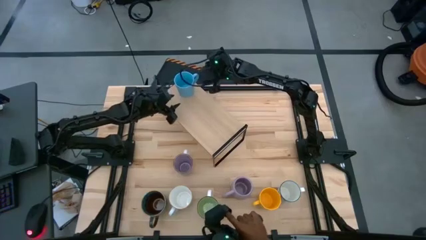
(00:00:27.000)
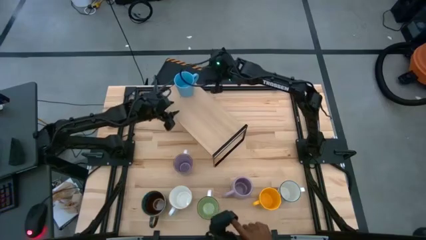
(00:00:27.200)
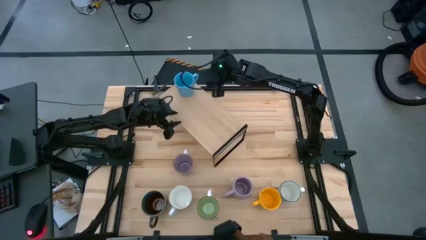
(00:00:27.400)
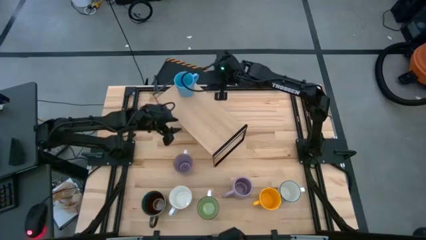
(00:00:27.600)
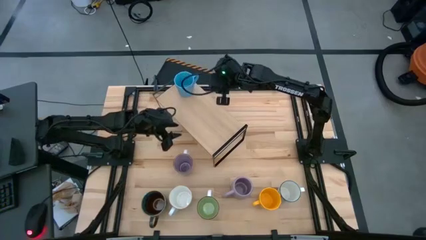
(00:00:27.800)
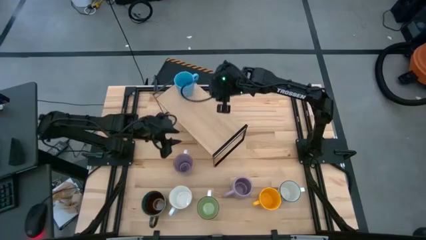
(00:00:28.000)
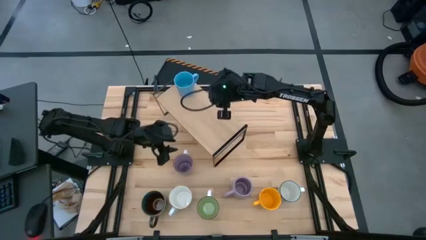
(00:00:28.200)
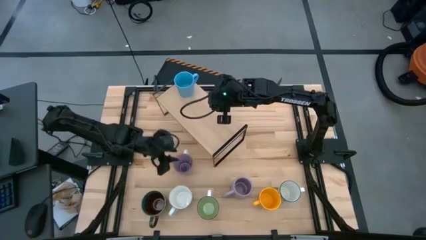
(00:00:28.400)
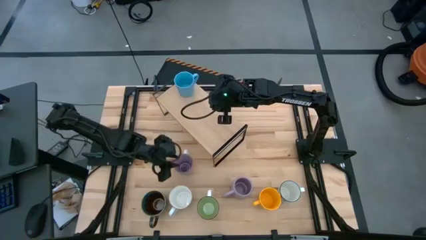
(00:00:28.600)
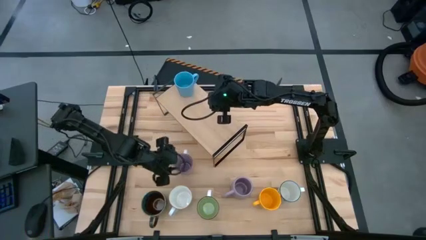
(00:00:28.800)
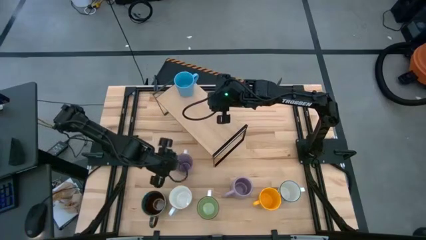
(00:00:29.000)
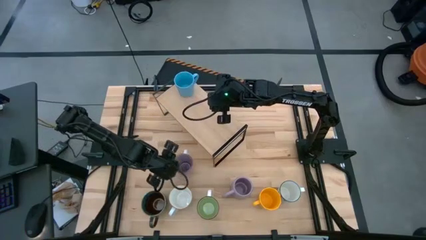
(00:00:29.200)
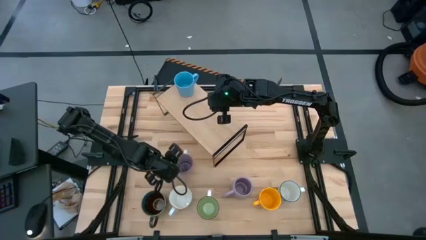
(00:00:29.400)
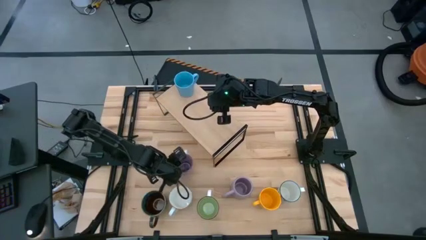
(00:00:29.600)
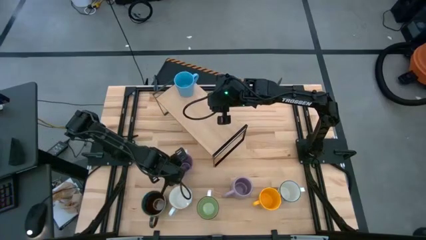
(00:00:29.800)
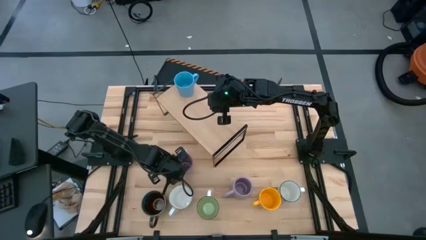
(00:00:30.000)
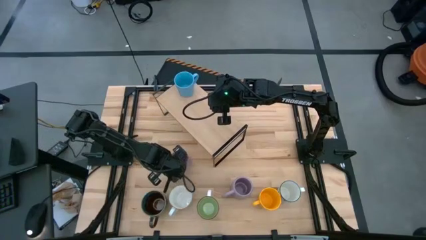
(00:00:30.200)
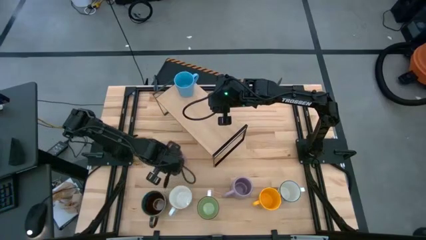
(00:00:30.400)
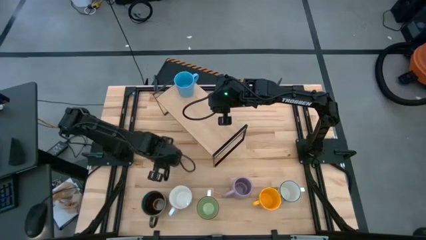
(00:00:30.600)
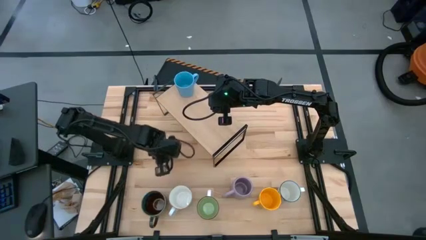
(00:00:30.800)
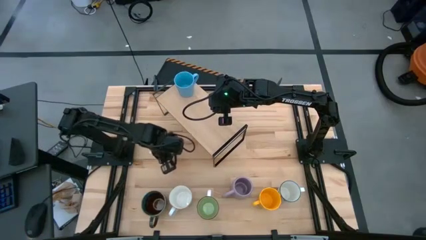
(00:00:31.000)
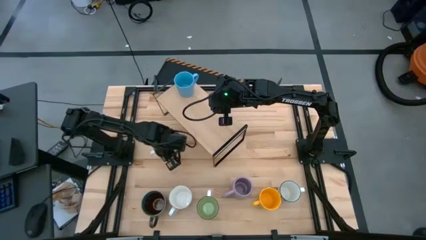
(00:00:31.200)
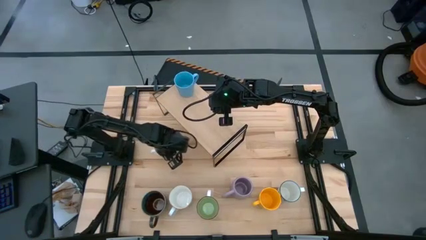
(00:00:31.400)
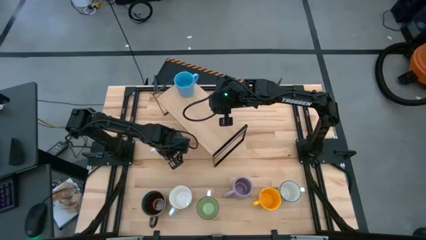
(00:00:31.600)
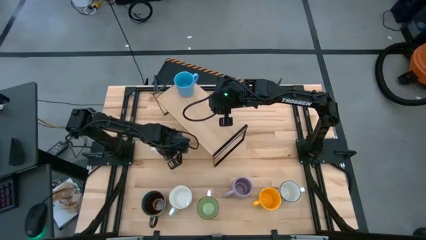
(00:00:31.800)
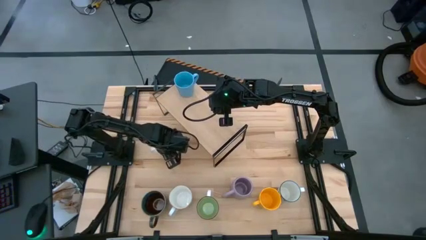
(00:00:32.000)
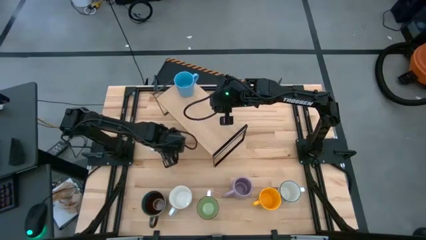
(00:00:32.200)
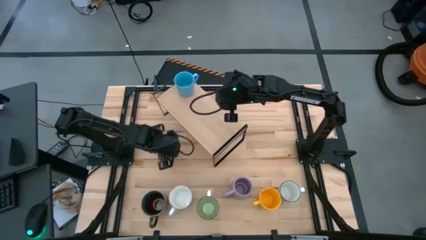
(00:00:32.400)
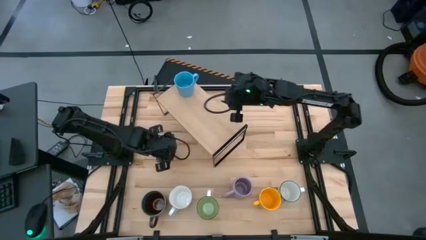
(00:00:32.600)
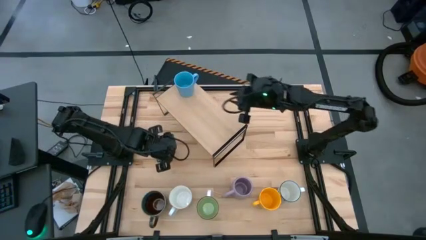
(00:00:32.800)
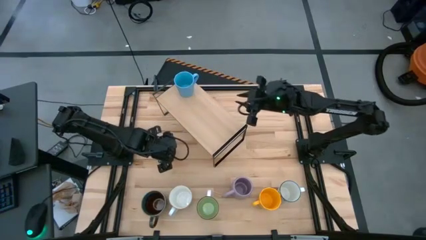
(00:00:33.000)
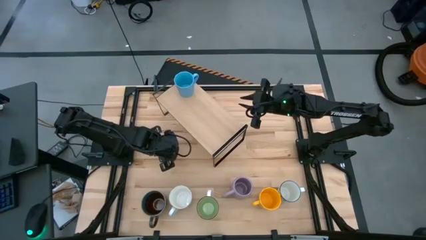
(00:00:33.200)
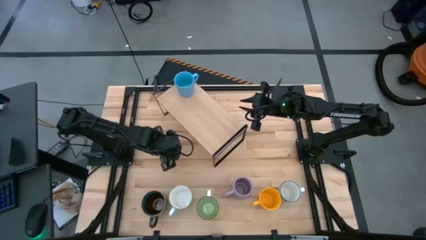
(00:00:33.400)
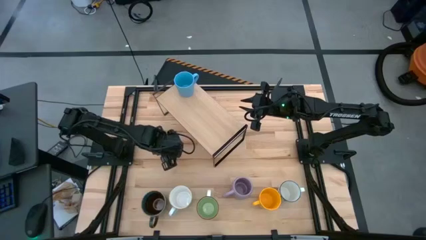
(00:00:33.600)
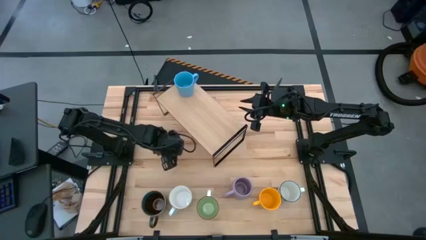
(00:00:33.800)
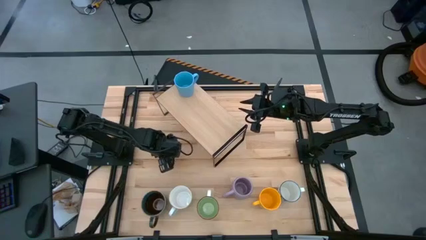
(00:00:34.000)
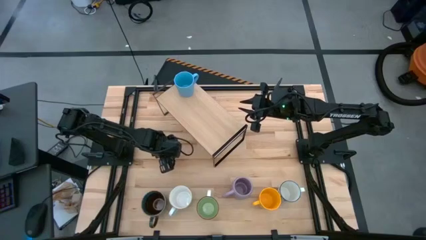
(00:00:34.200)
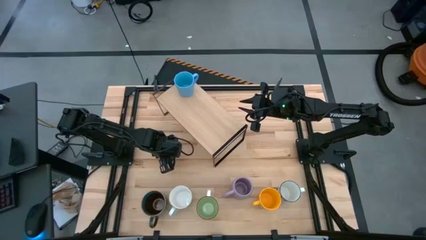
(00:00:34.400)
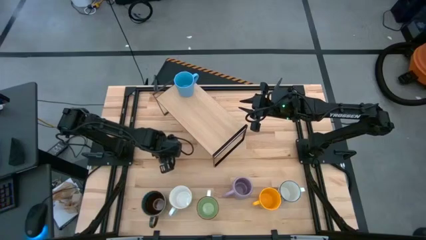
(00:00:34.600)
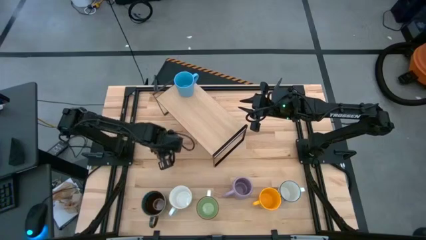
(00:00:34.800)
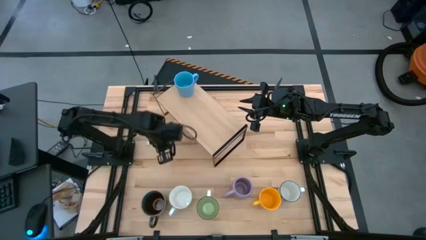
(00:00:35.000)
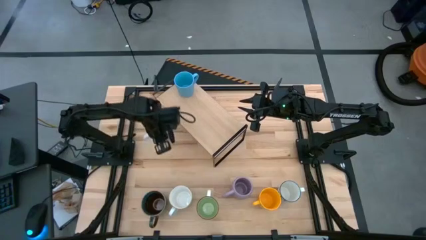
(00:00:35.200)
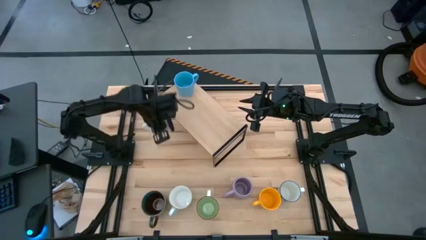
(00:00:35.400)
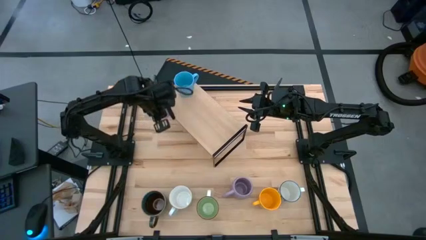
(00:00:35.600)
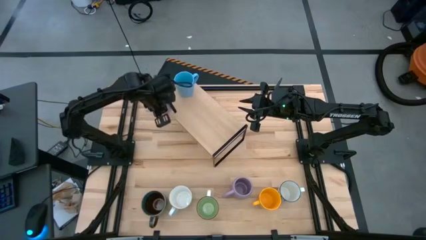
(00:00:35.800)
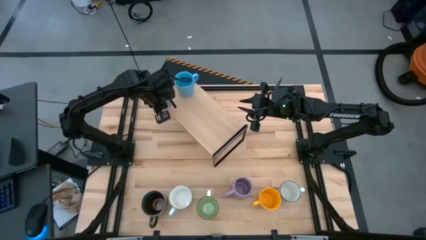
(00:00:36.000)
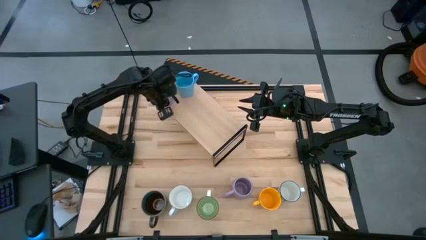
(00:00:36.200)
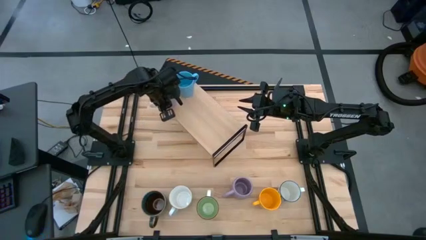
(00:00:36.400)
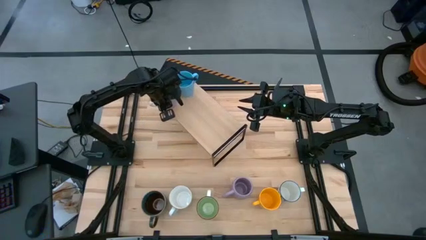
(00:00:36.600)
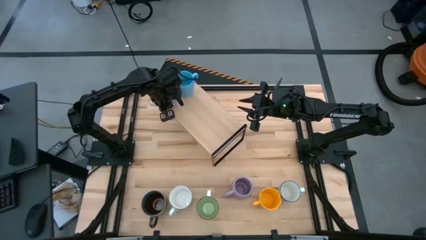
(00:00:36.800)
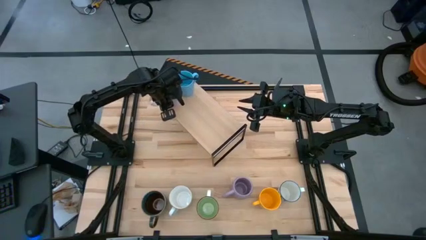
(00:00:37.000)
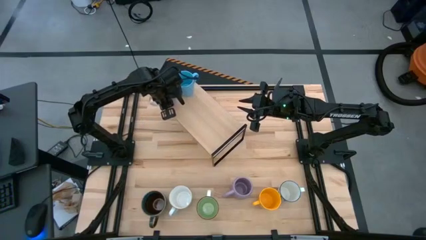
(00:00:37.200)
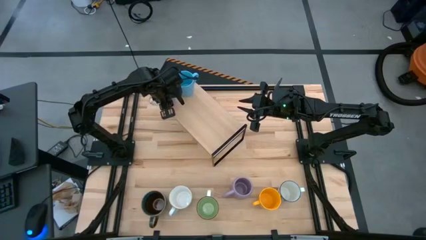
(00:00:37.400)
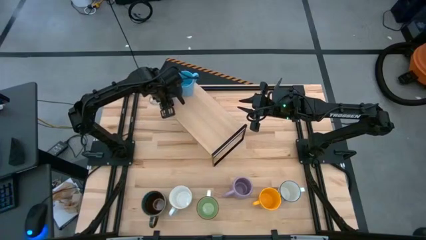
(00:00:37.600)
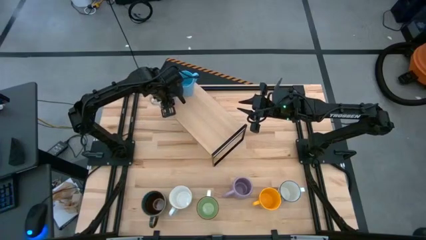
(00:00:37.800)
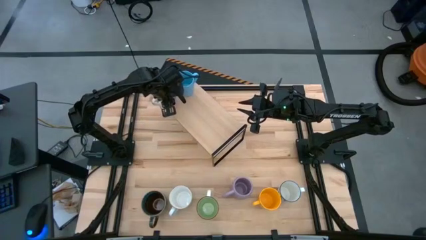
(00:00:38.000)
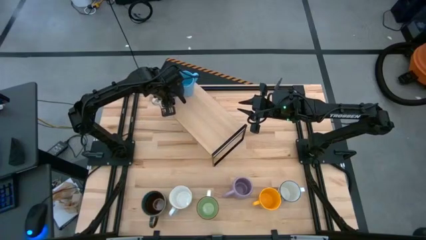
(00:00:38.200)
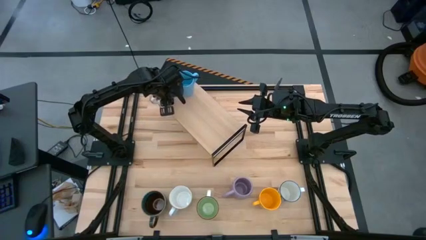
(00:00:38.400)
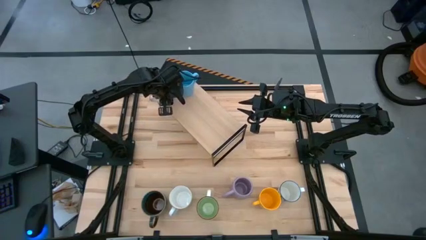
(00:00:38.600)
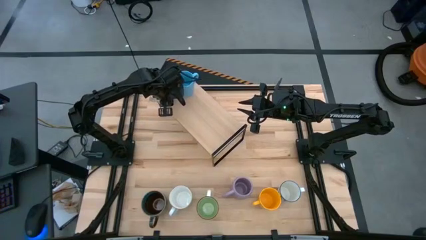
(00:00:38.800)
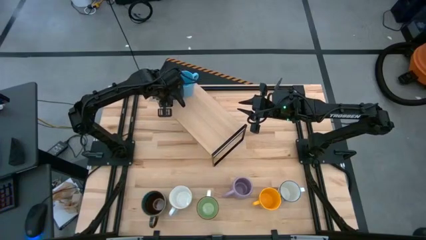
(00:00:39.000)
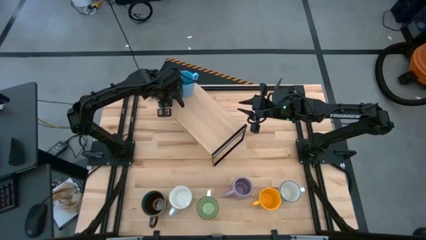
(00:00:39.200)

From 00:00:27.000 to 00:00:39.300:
Task: Place coffee mugs
Put the top purple mug on the shelf

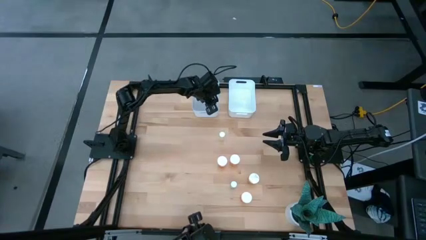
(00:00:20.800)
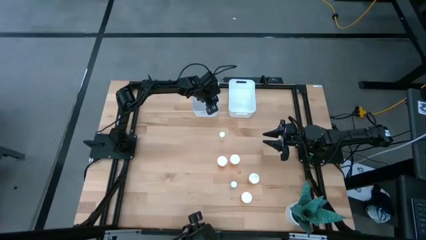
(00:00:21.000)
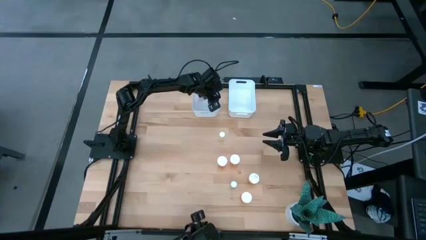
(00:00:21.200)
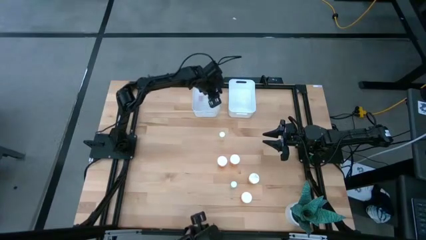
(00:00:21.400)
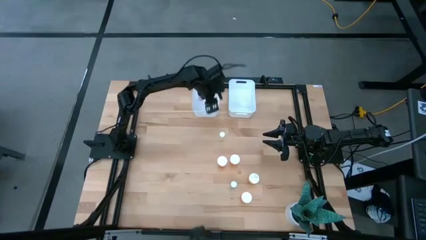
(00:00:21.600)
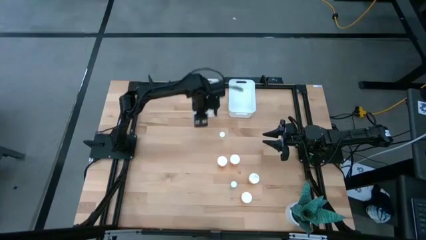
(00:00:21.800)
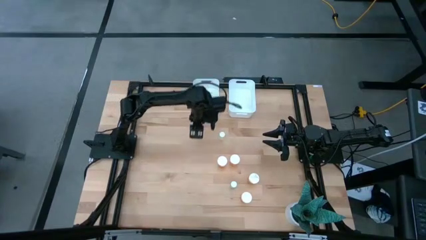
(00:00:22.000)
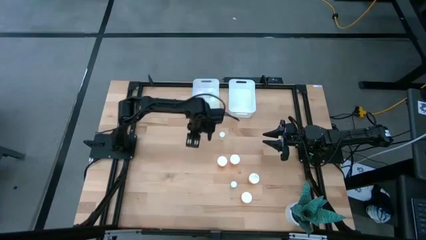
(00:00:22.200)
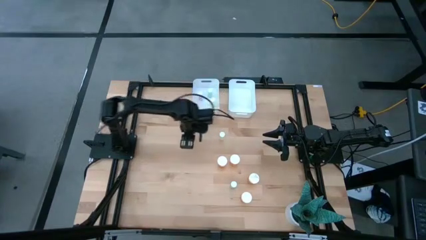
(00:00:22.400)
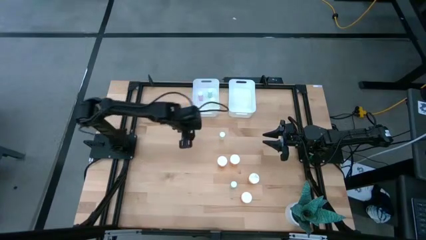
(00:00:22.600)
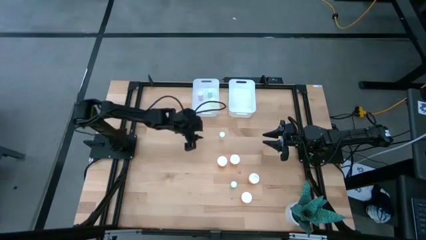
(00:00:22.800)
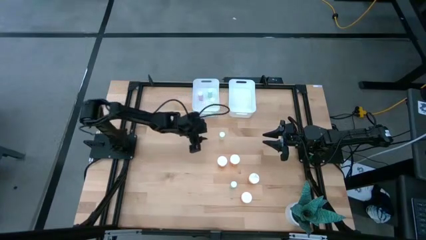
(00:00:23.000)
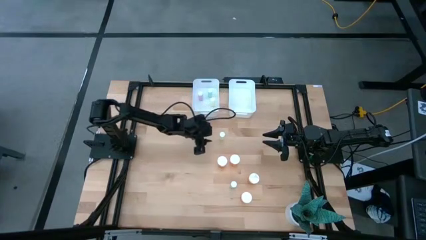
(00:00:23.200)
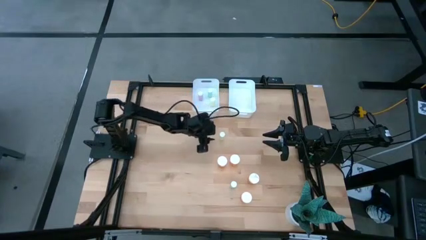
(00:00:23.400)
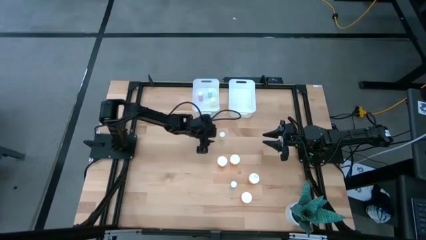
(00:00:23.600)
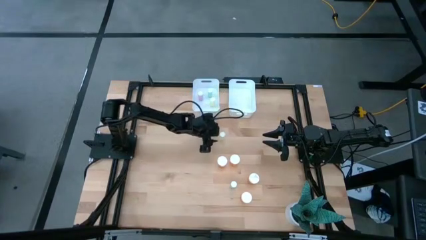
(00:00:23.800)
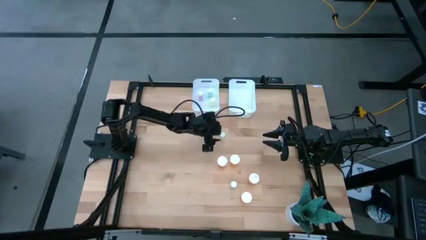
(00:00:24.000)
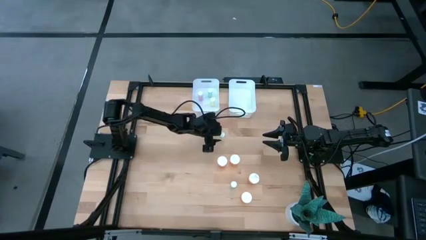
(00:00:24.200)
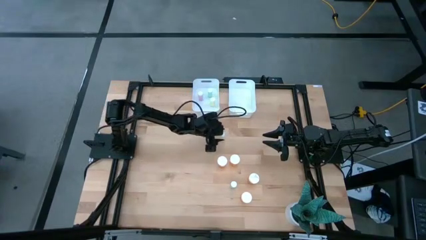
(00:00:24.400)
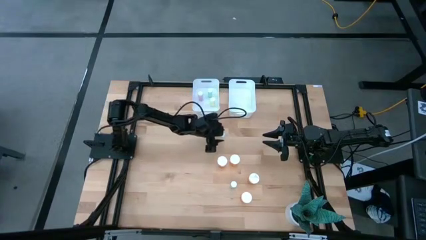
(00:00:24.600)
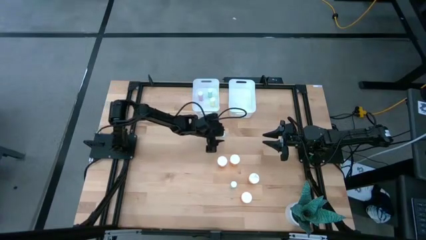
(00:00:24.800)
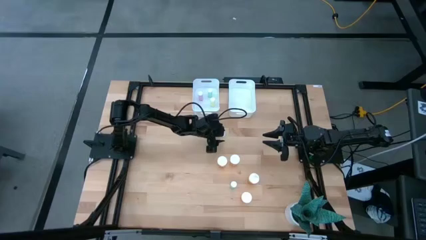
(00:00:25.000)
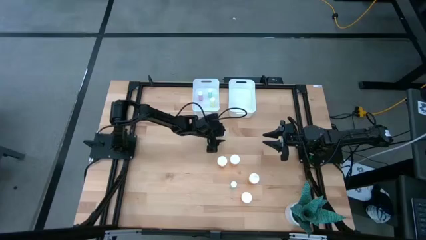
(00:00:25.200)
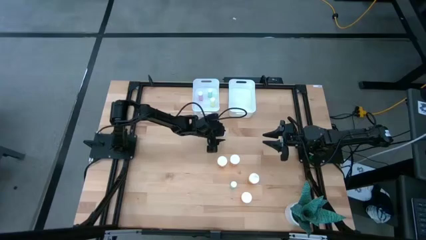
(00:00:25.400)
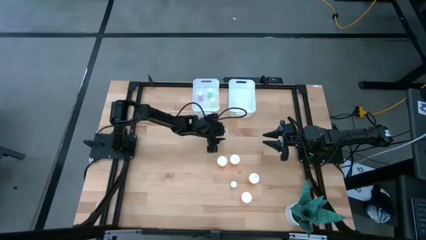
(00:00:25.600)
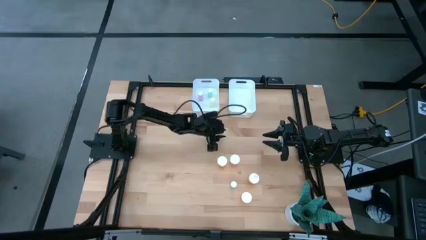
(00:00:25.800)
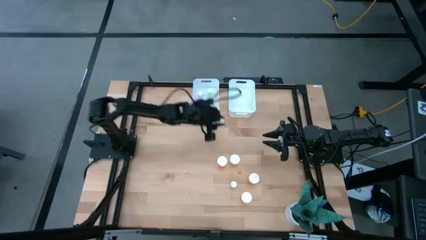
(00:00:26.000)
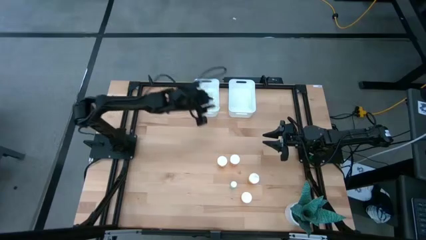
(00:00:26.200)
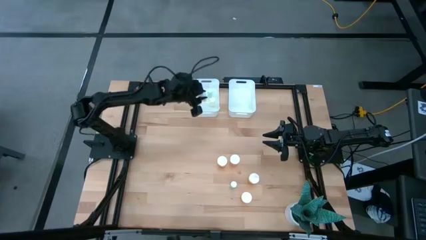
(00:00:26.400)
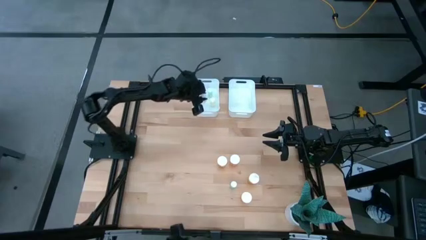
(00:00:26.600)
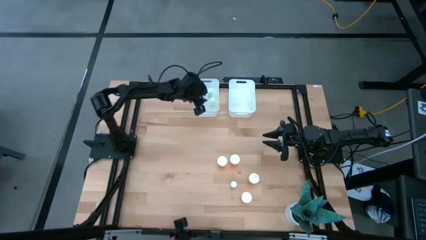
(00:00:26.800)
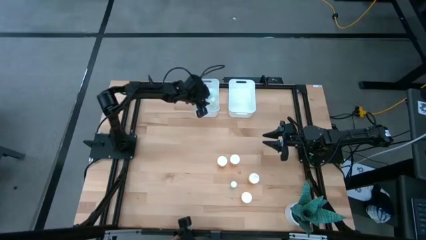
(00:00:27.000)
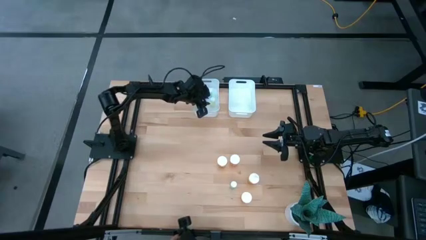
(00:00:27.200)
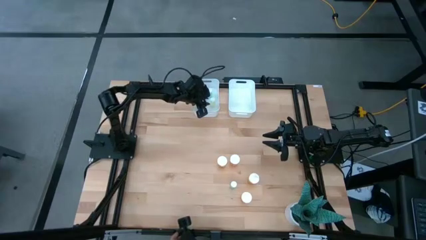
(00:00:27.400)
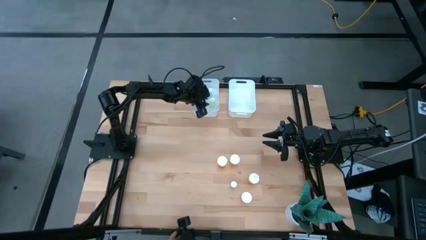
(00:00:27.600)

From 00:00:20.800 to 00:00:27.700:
Task: Pick and place medicine bottles into bin by pill shape (circle, oval)
Put the yellow tablet bottle into the white left bin
